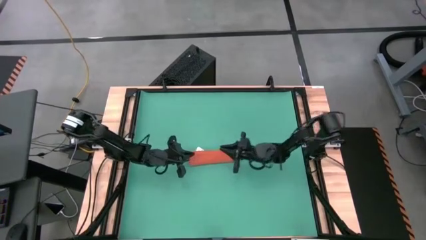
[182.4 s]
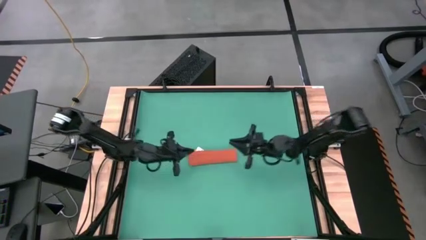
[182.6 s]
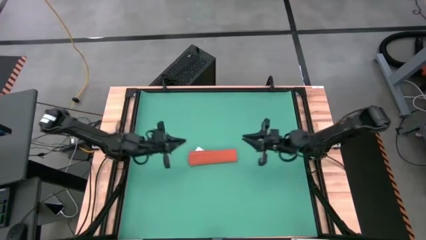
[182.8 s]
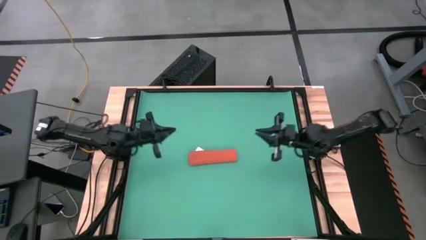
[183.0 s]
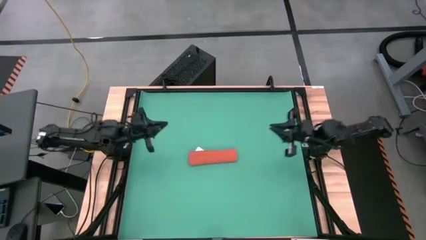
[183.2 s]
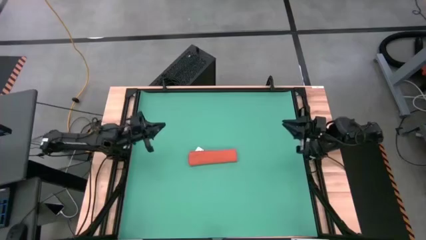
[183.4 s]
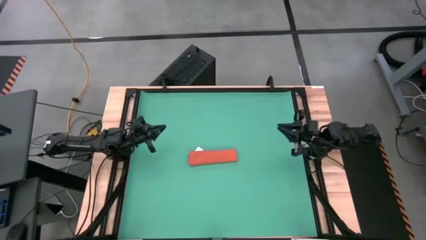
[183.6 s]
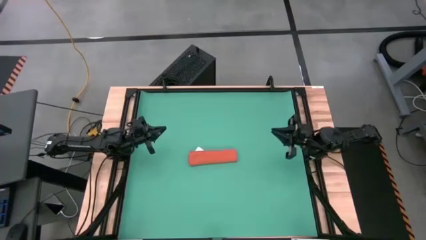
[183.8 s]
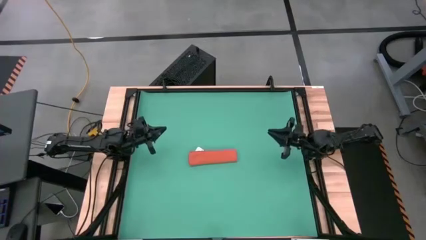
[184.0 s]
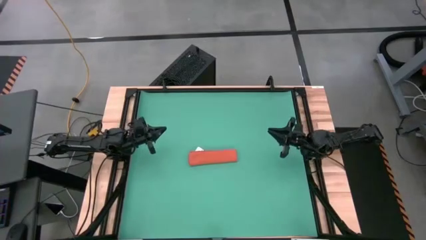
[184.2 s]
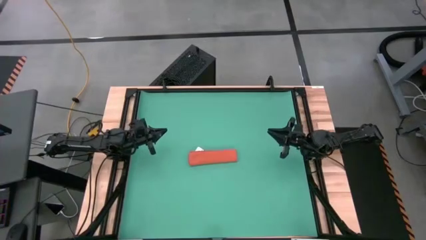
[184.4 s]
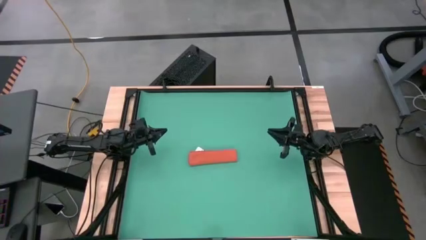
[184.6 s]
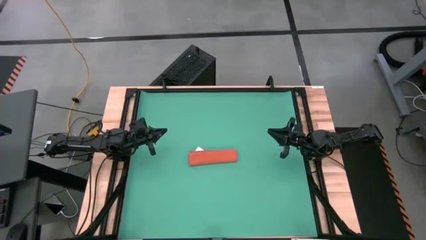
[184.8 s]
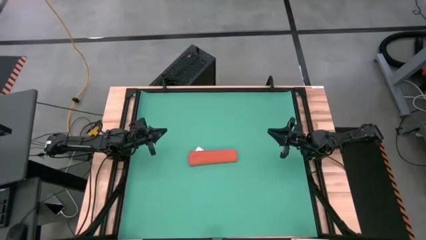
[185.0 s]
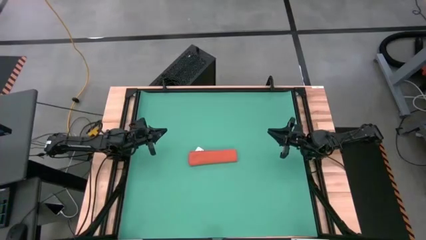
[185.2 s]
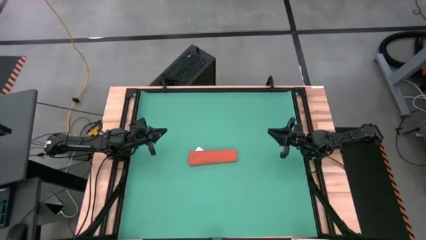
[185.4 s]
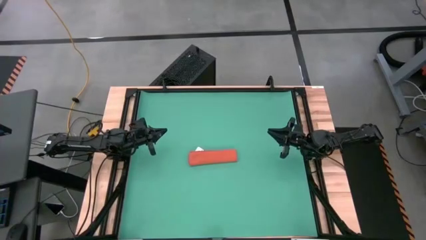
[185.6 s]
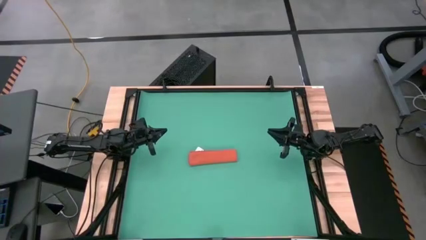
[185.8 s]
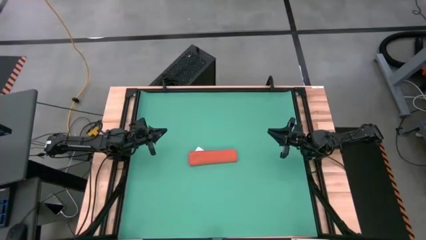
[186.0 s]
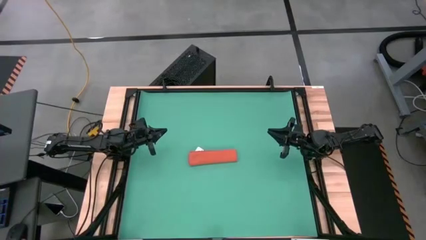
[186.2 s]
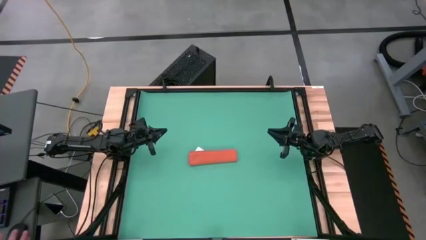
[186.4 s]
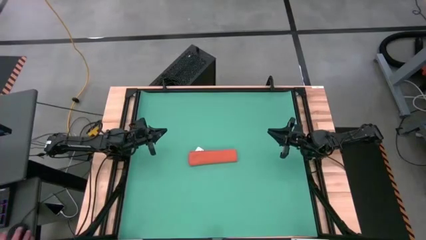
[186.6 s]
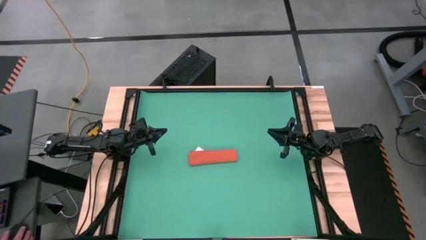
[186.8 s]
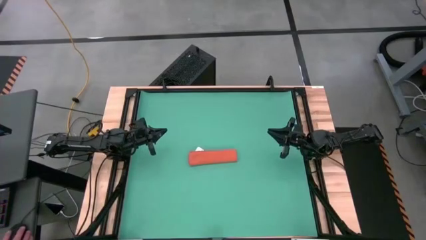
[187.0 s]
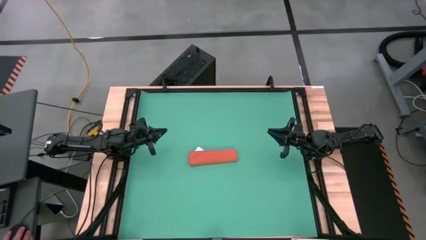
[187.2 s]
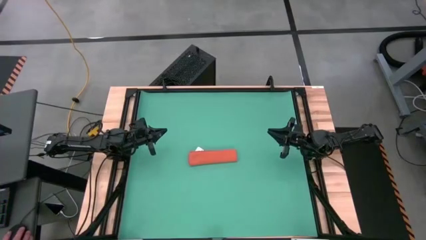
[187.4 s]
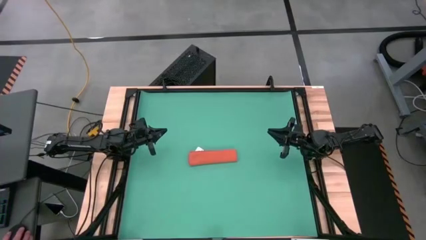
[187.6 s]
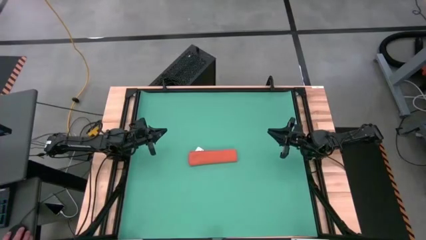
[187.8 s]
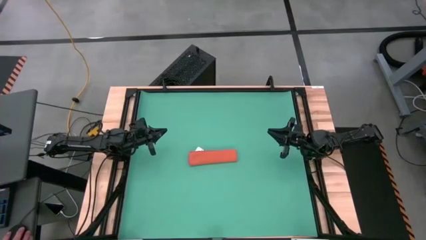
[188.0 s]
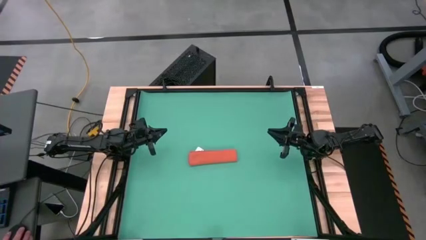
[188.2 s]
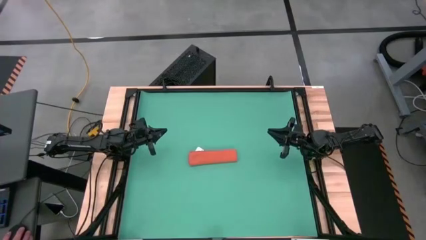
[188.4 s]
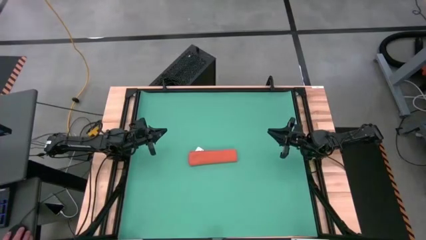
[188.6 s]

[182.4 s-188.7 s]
Task: Roll towel
Return to Home Position

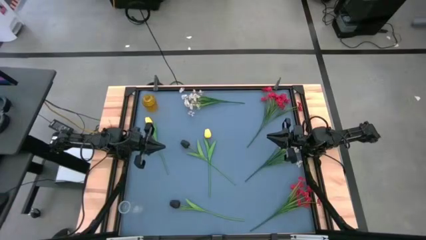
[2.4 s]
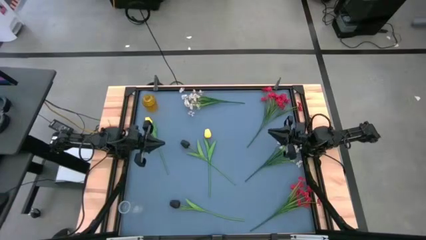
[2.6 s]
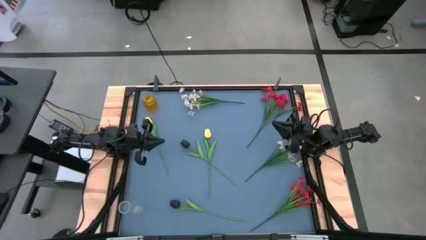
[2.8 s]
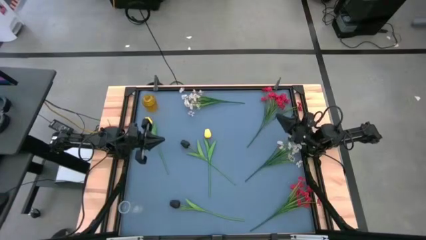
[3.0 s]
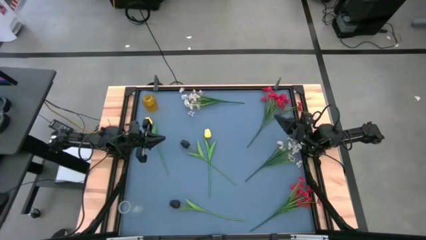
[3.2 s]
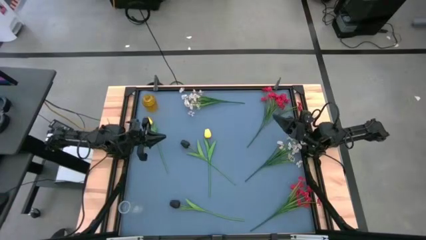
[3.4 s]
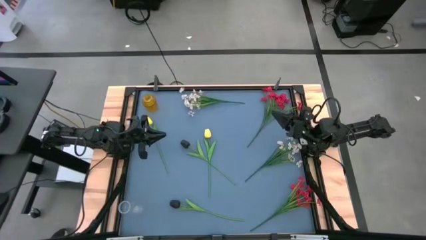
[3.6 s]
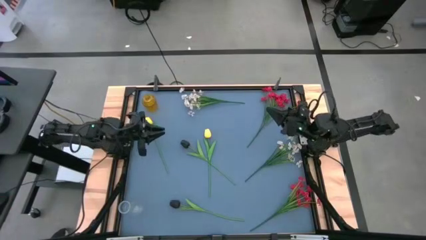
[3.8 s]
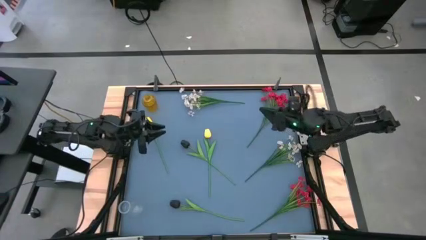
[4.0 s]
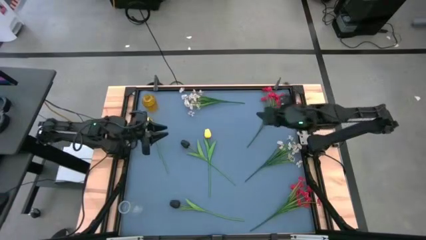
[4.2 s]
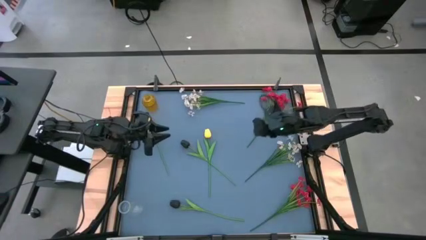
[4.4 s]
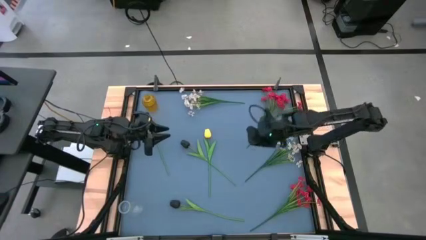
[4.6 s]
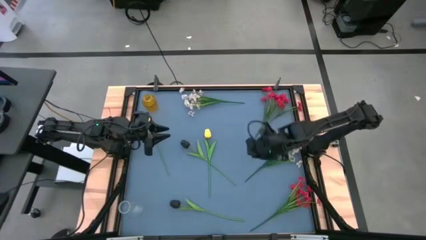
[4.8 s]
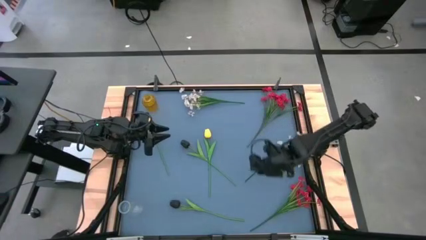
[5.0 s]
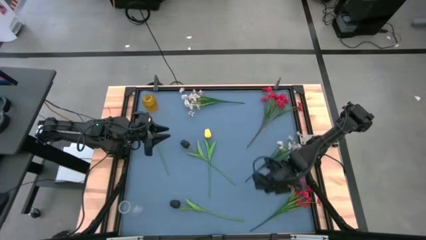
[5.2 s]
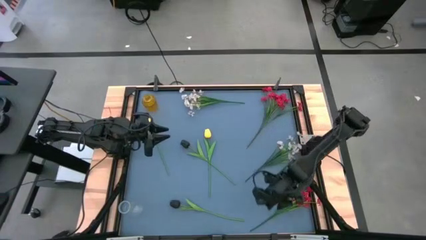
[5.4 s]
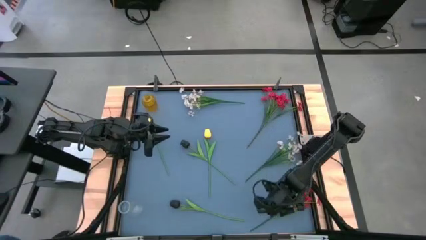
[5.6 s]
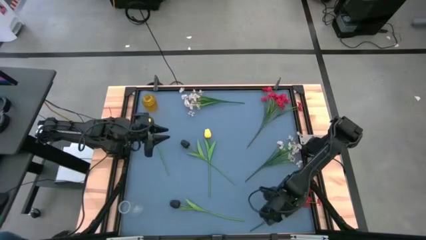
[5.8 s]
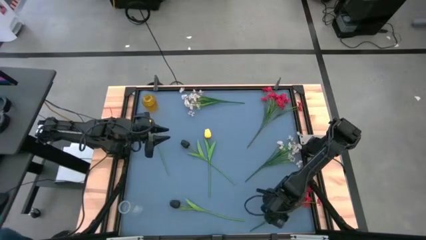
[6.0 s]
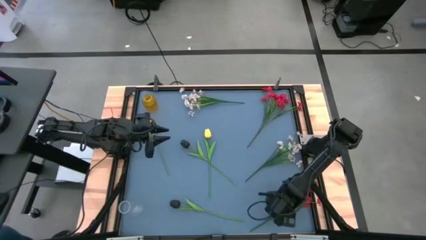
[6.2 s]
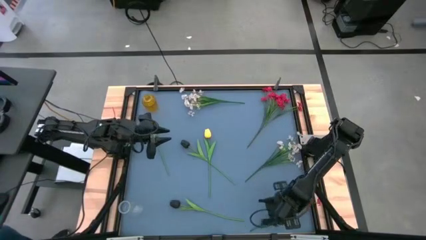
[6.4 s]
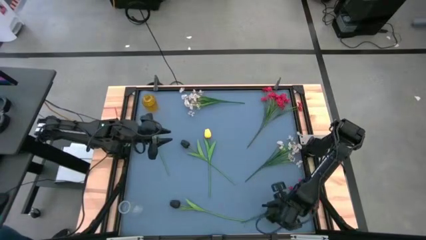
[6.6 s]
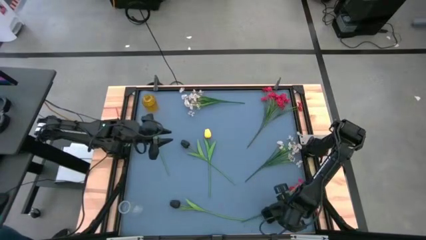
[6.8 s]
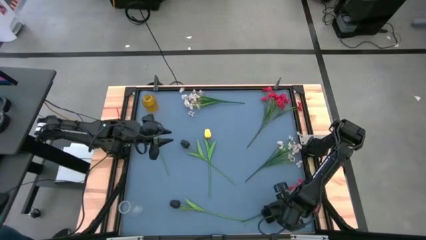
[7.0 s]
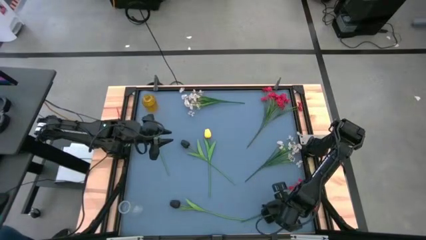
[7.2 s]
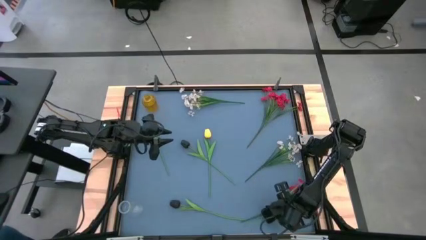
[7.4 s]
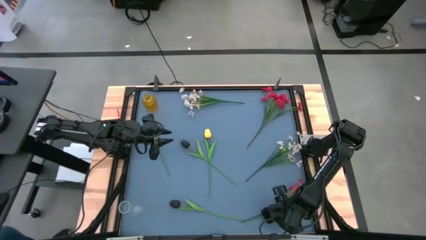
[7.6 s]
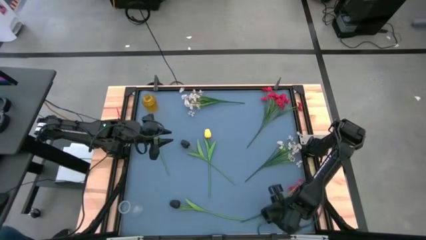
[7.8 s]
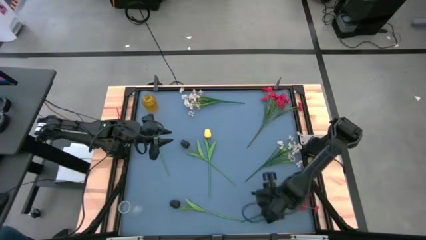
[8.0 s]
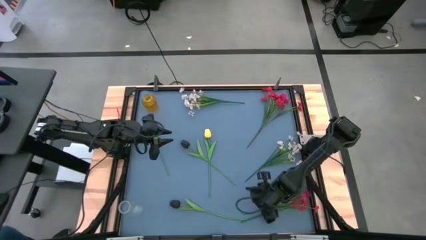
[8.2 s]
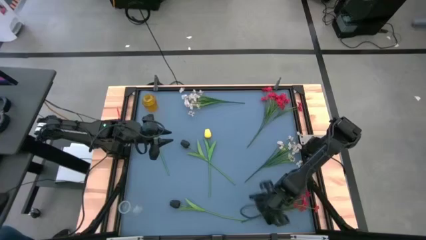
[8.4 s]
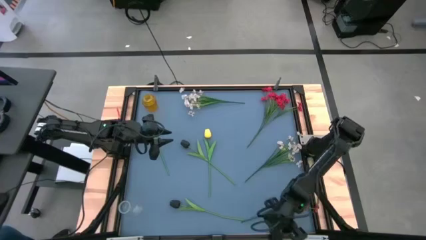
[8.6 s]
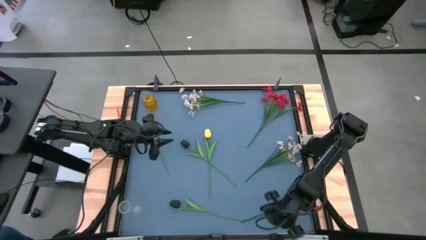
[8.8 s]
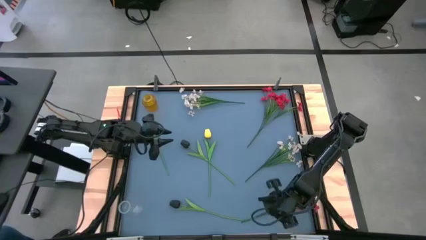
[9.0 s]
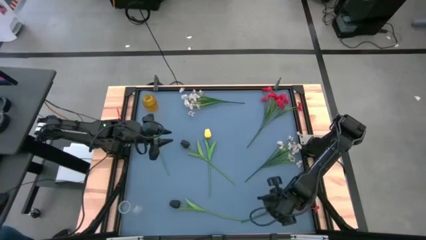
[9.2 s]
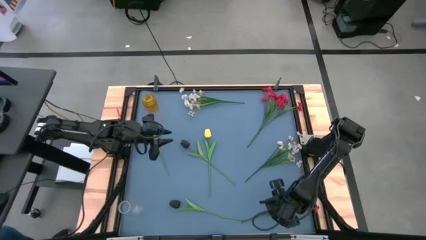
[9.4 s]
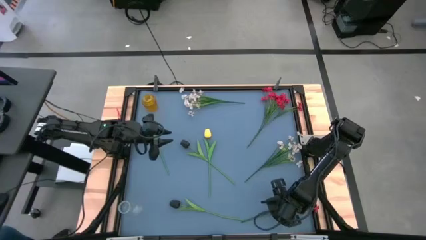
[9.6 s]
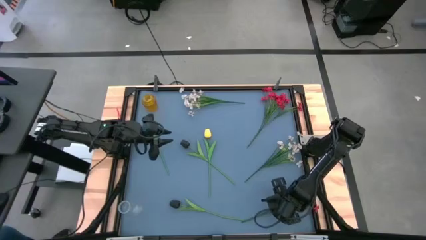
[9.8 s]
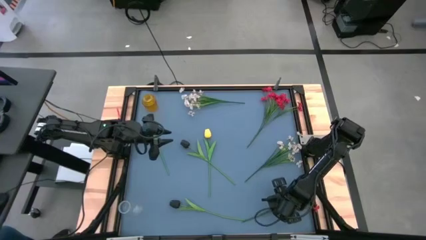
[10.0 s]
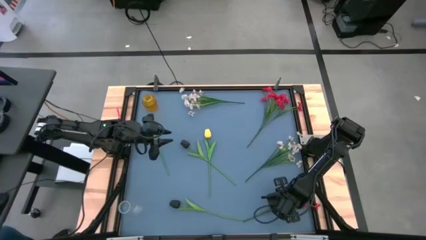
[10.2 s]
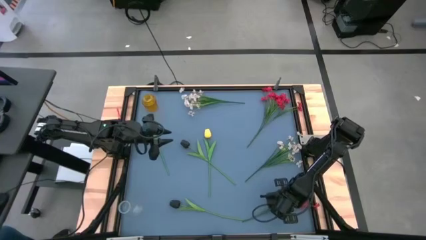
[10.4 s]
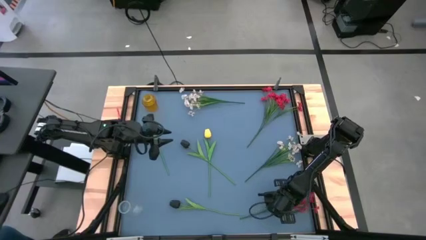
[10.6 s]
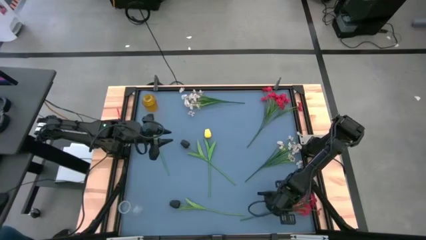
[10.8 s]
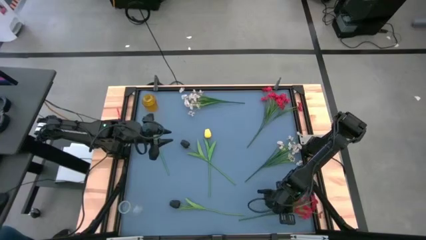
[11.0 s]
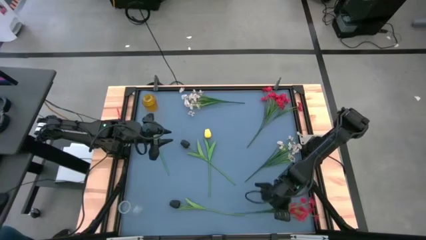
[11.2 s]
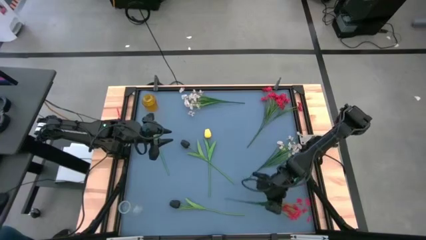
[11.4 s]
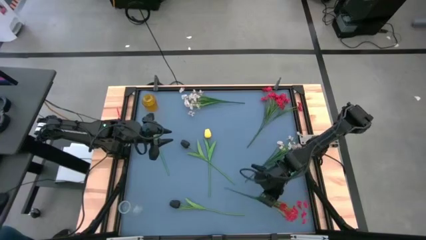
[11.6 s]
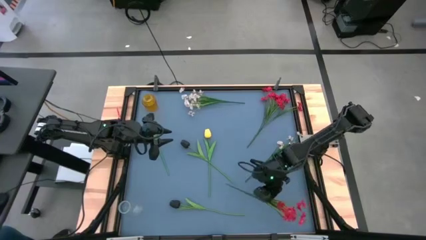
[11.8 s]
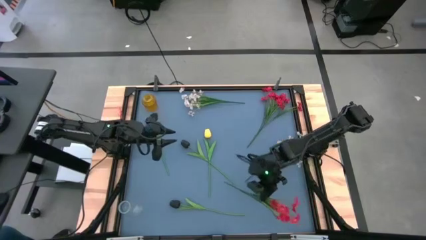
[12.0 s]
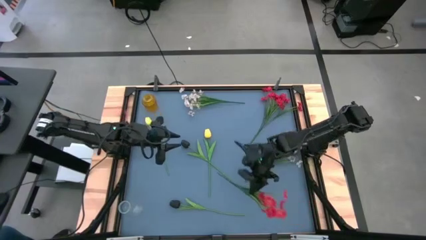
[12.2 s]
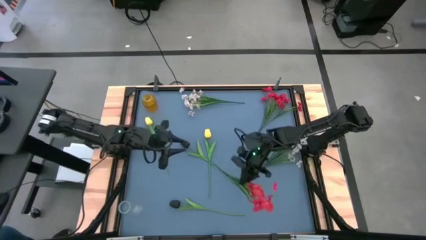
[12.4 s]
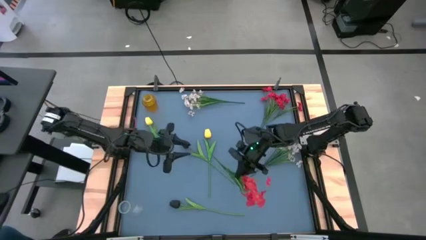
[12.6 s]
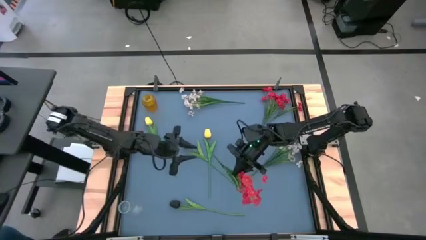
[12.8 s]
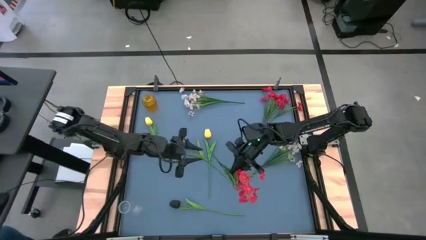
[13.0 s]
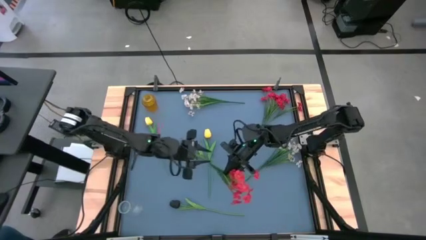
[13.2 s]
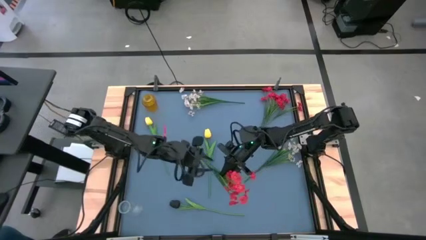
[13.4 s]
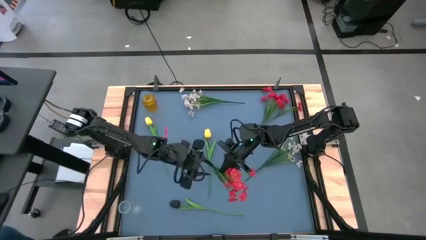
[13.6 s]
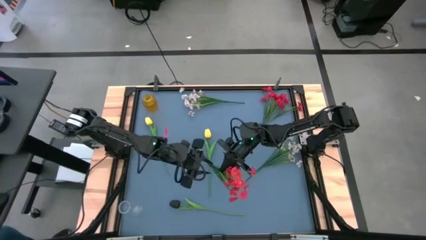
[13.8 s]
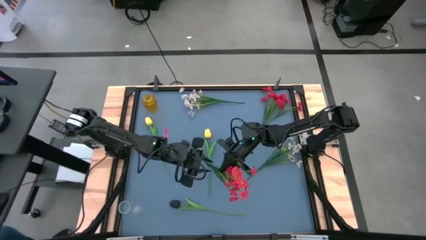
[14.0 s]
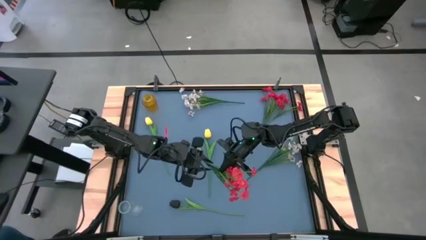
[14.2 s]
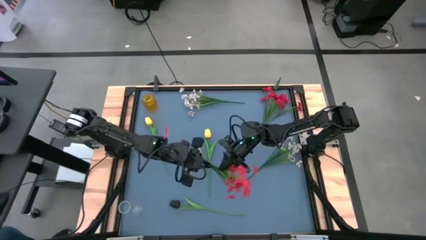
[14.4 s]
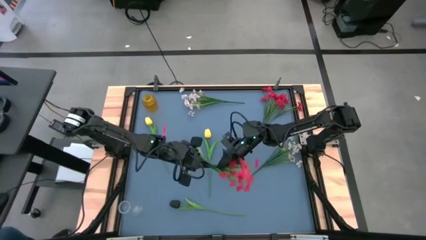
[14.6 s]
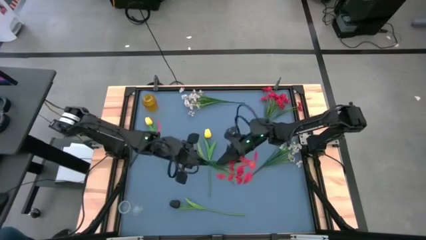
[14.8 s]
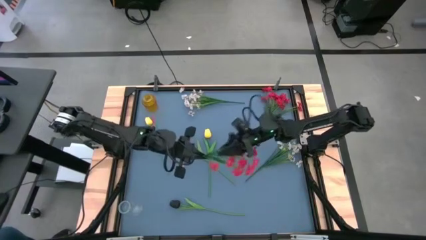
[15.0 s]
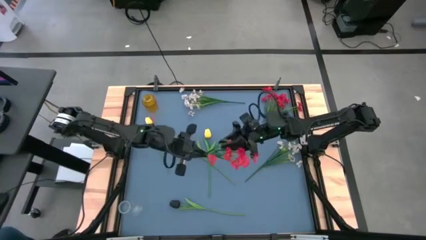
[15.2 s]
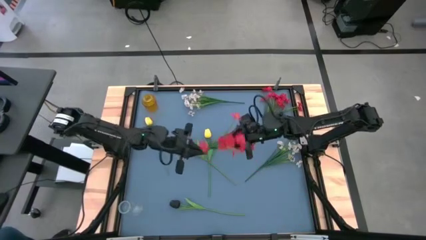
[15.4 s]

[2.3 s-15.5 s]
Task: Sort flowers into vase by color
Put the bottom red flowers into the yellow vase
